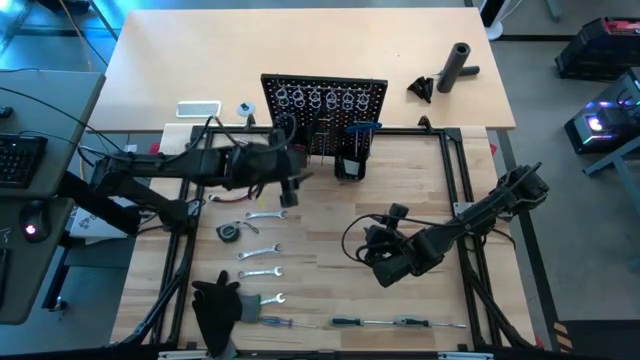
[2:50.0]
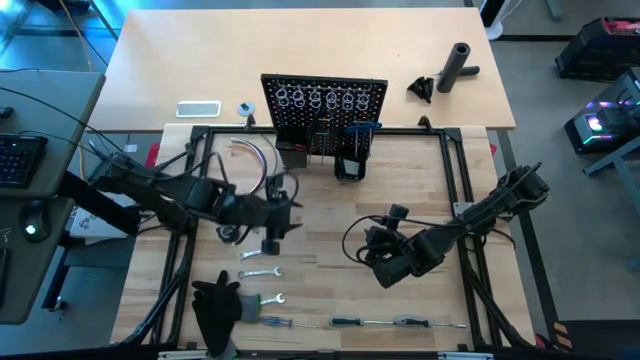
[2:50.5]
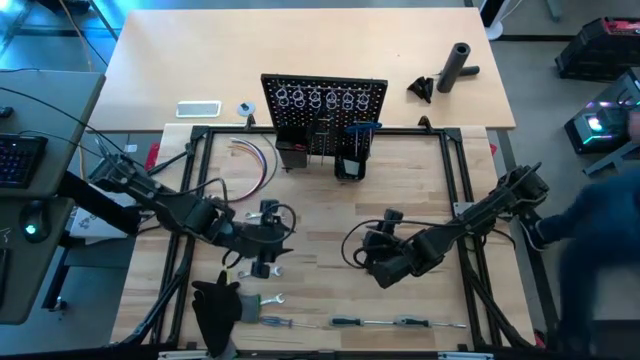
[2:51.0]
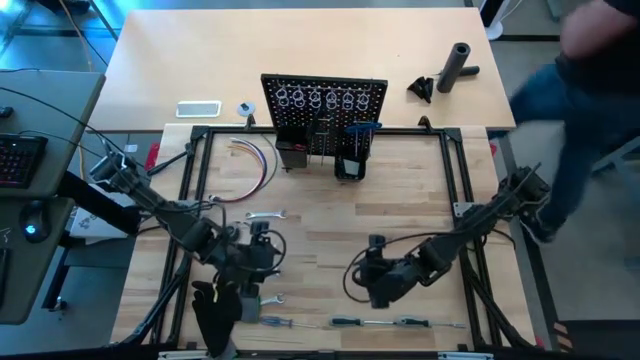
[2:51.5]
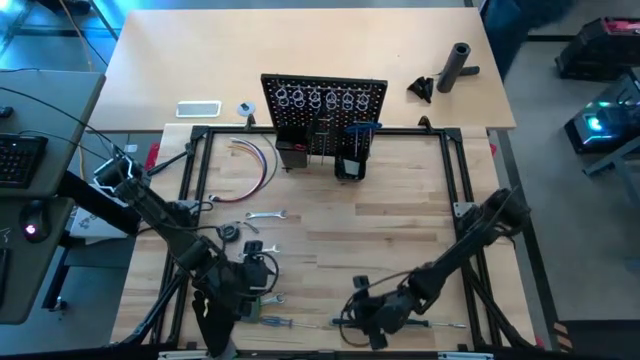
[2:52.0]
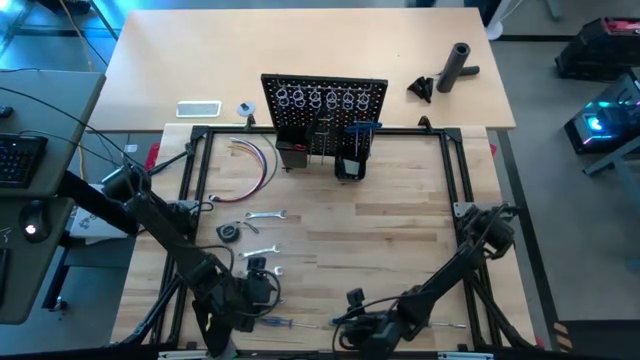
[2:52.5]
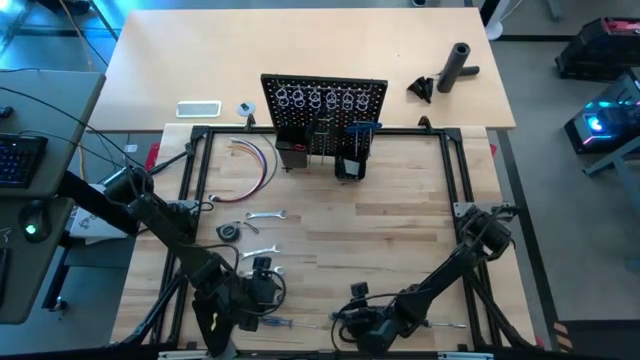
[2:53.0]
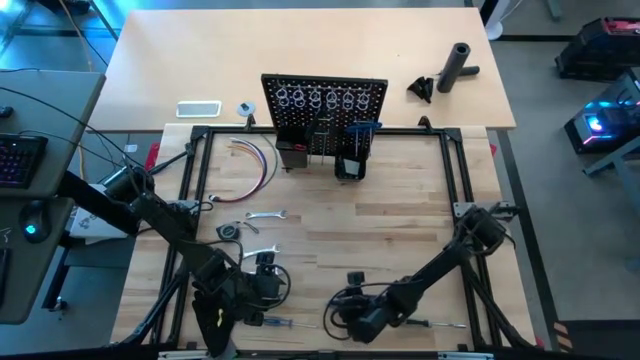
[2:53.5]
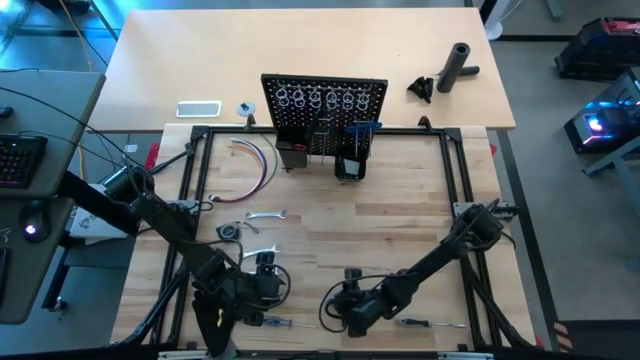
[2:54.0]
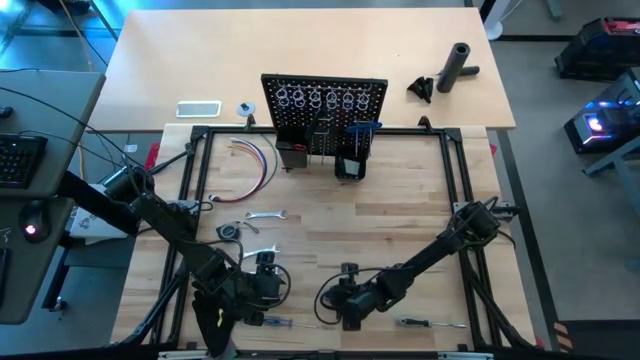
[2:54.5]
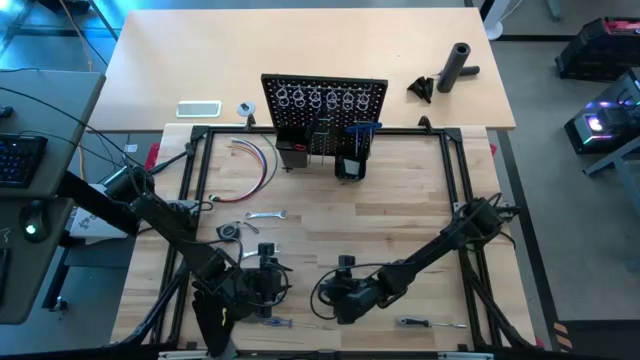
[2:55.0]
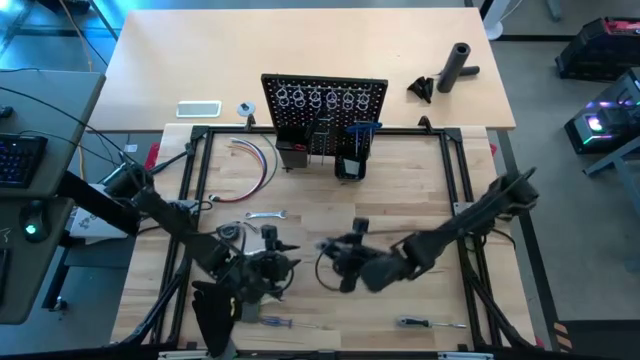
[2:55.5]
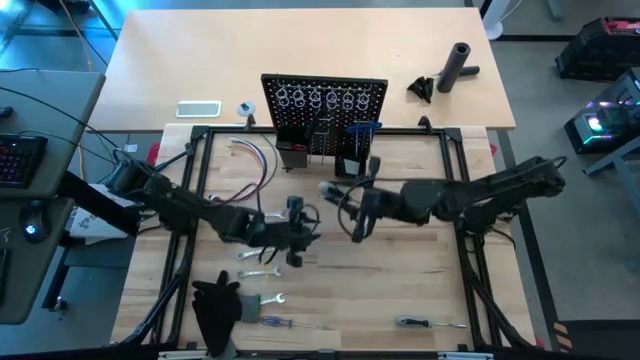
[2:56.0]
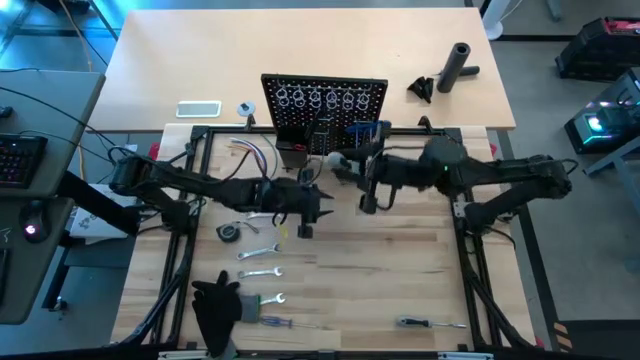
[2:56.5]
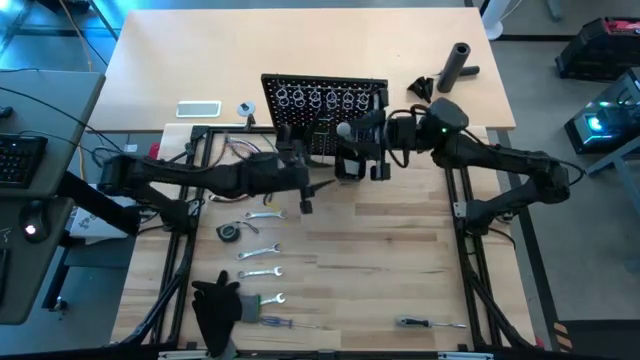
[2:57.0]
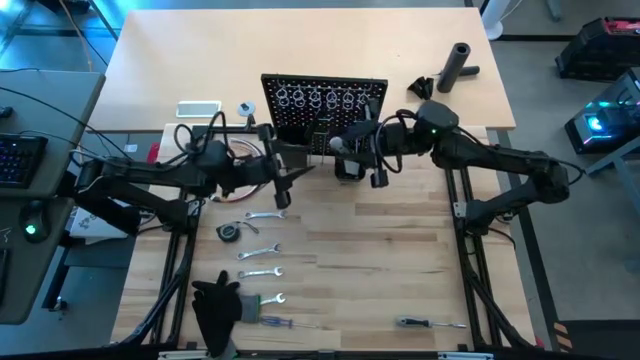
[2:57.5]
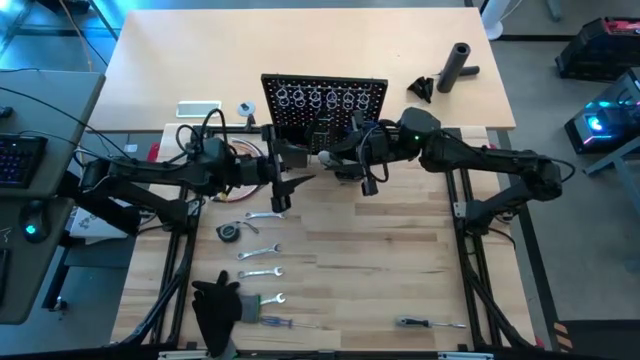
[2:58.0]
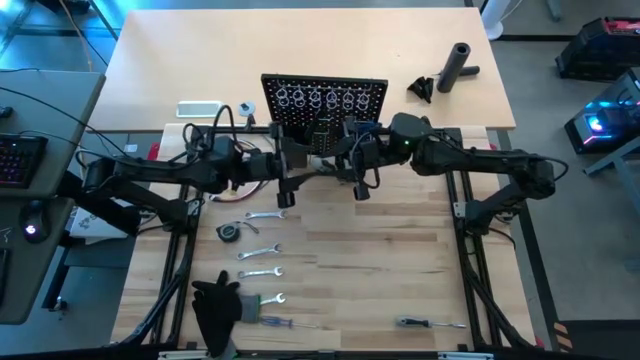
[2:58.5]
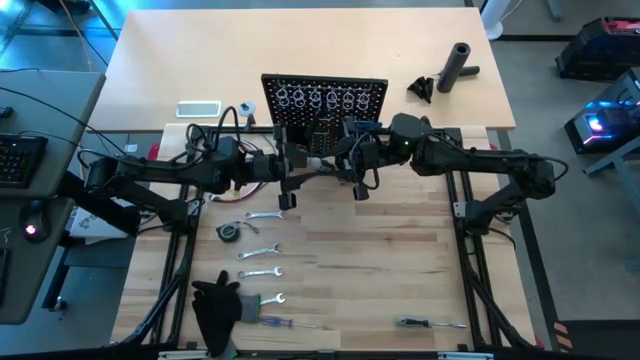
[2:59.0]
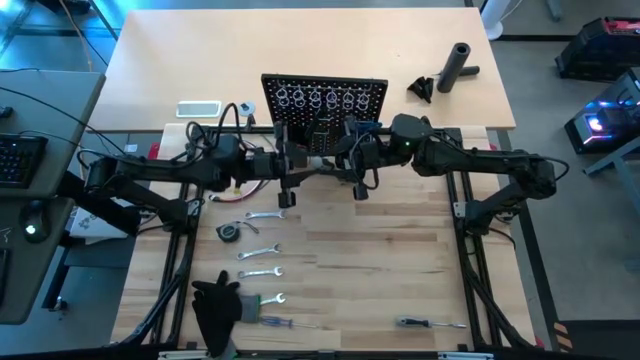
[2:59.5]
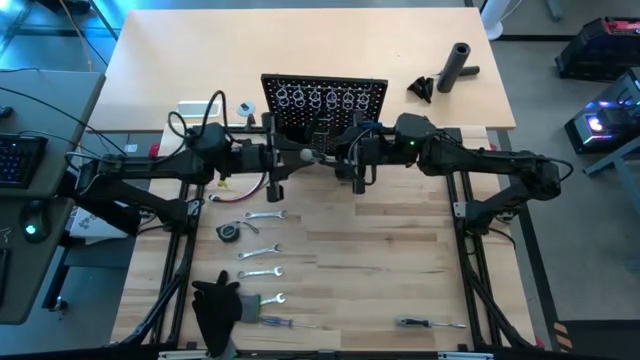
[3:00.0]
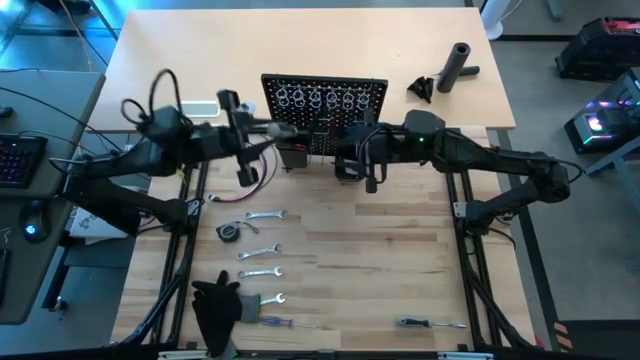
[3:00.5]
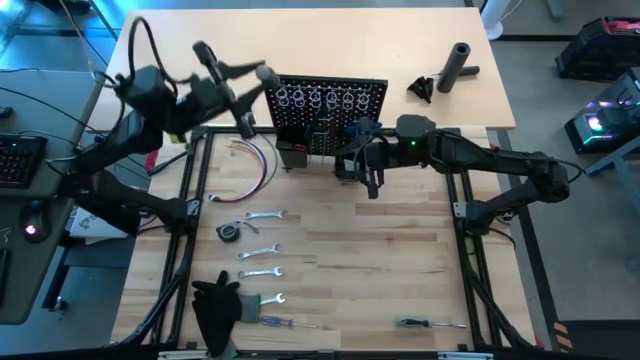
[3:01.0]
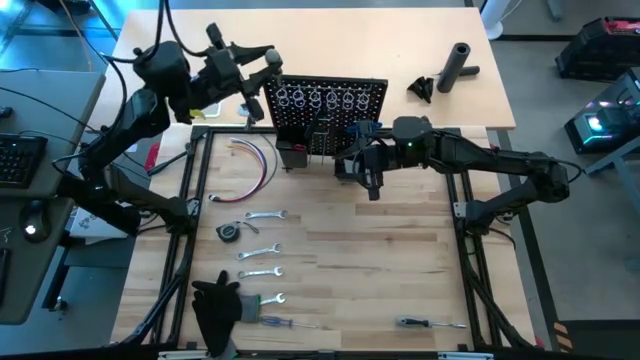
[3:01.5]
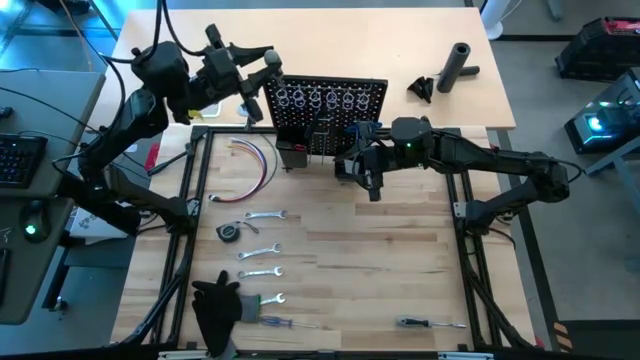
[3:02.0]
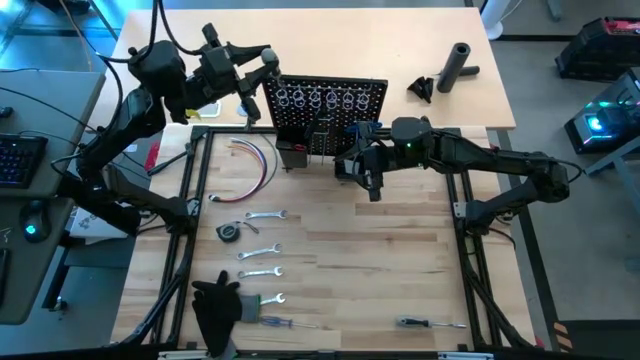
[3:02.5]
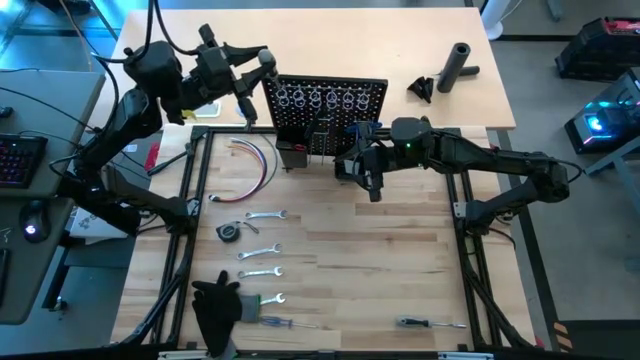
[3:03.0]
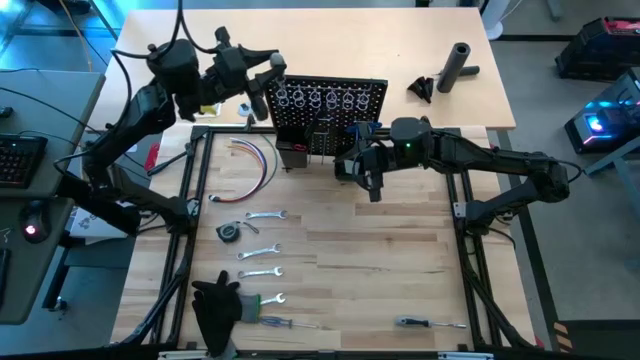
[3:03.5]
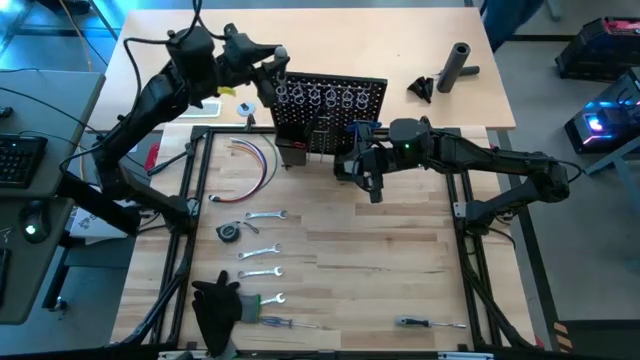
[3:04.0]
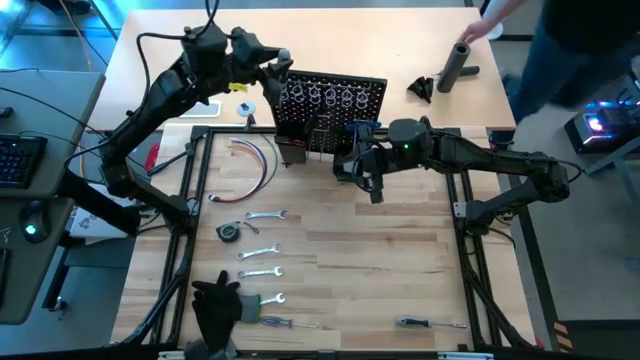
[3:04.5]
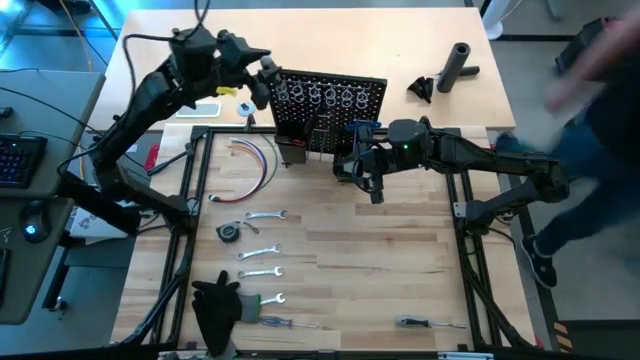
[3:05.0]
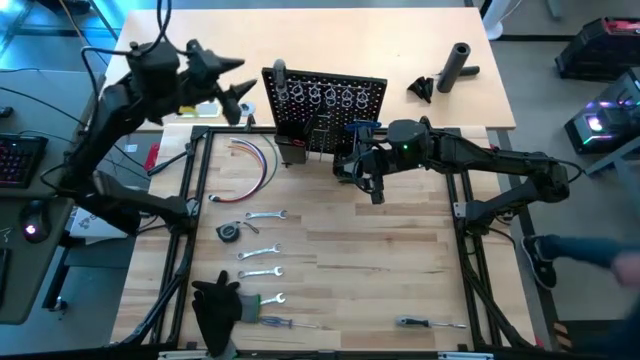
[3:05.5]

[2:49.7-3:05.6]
Task: Hang tools onto peg board
Hang the left gray screwdriver on the black pegboard

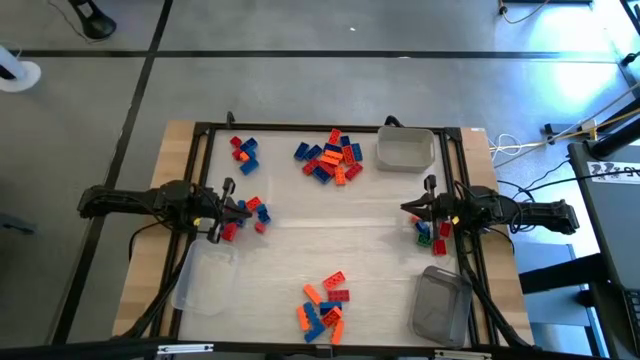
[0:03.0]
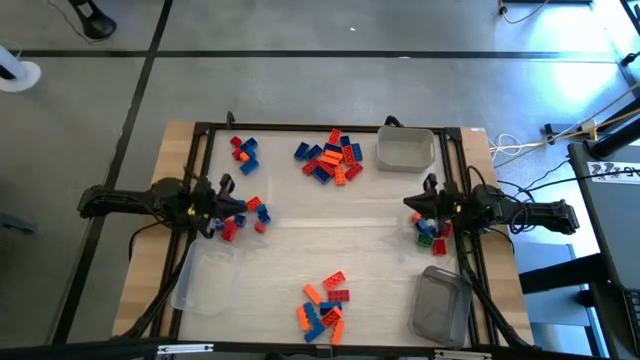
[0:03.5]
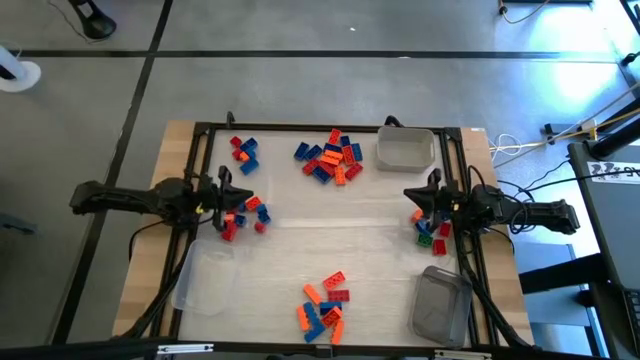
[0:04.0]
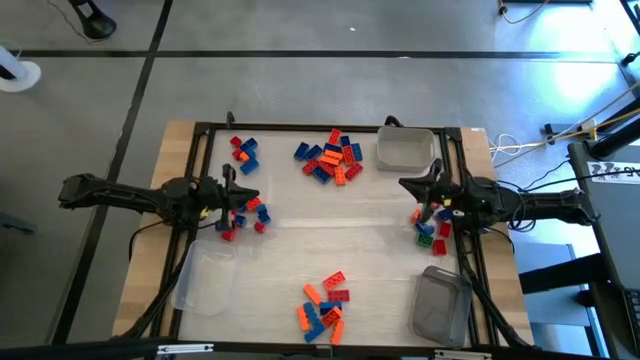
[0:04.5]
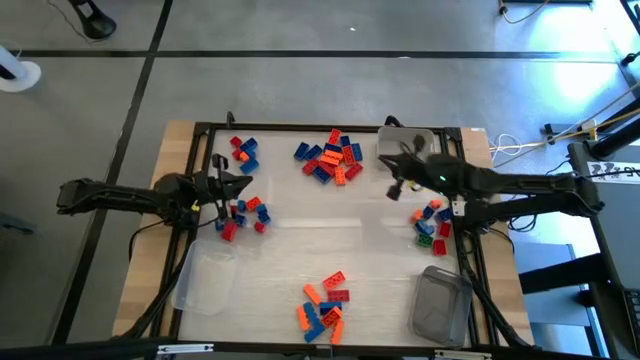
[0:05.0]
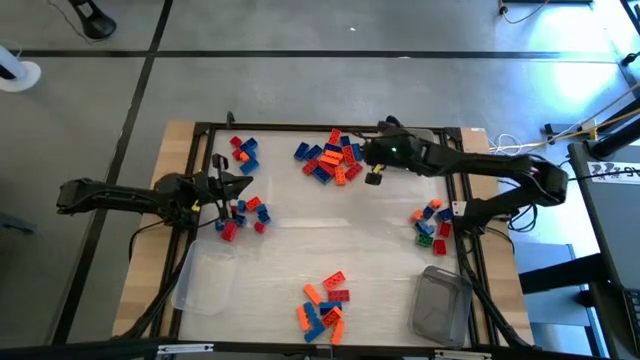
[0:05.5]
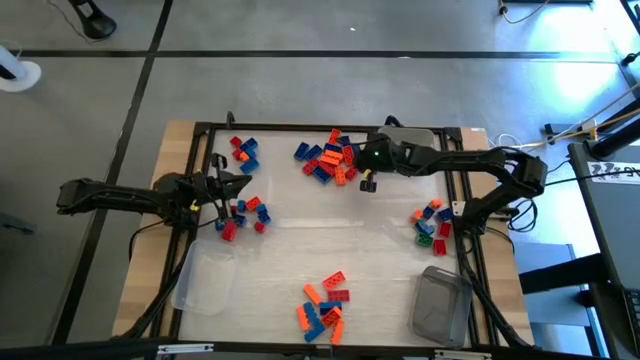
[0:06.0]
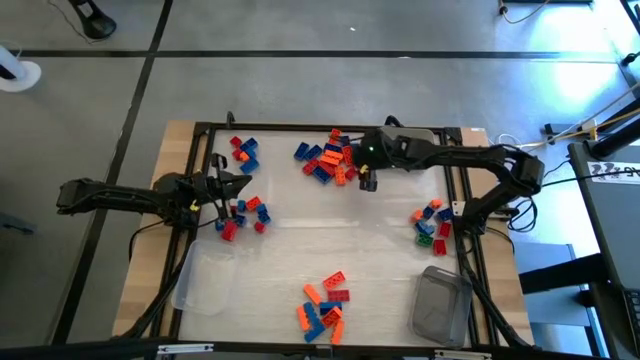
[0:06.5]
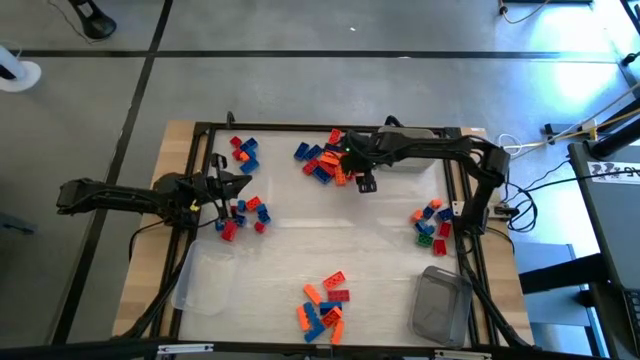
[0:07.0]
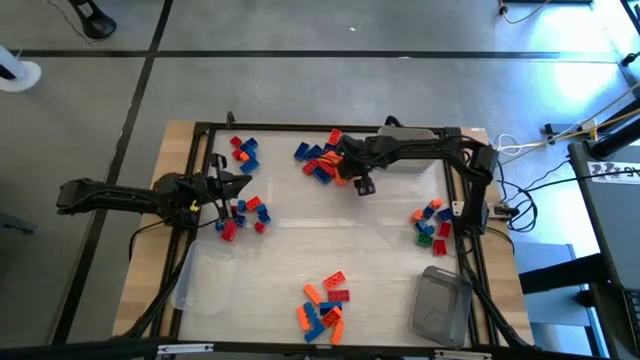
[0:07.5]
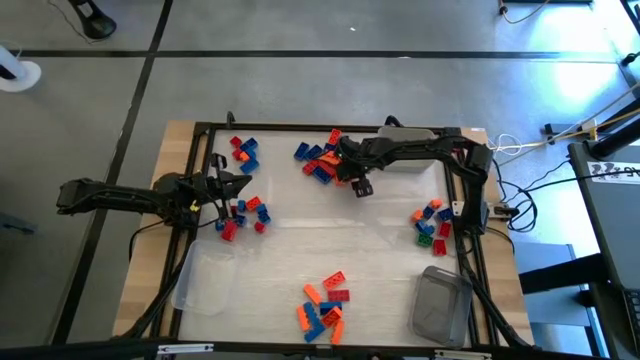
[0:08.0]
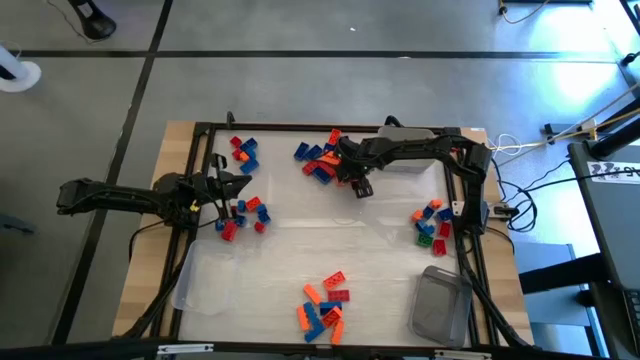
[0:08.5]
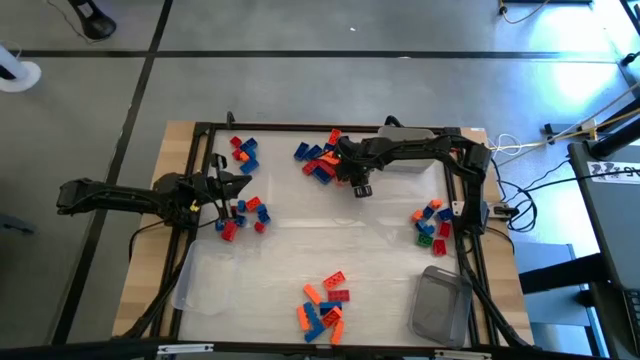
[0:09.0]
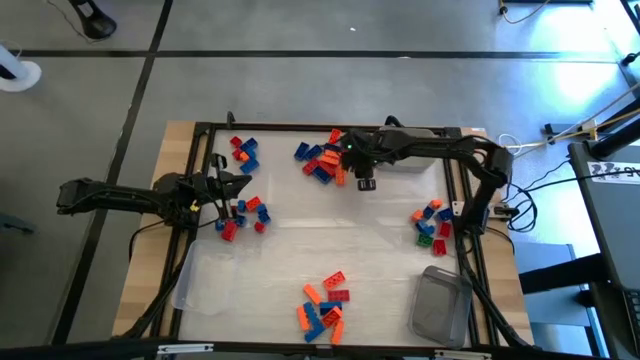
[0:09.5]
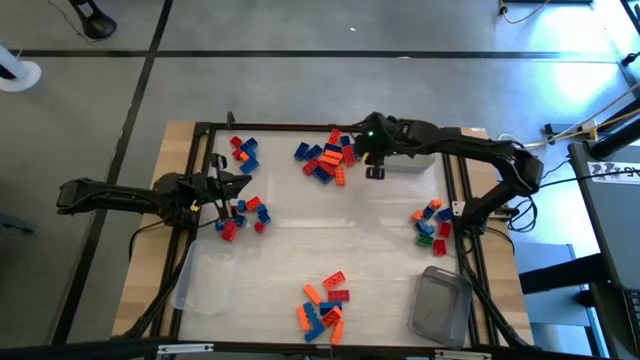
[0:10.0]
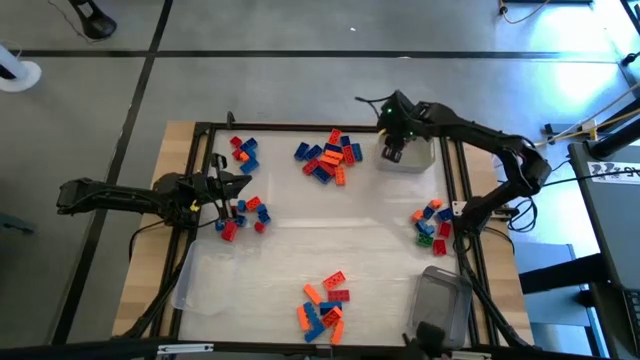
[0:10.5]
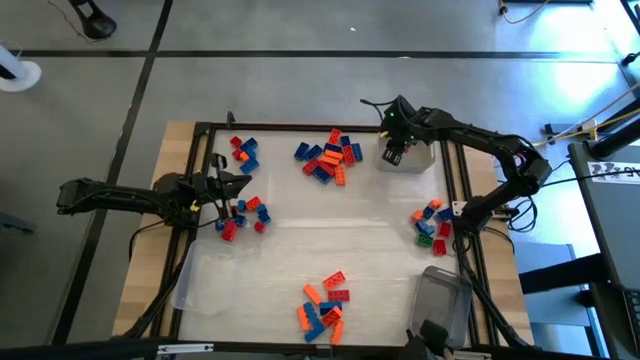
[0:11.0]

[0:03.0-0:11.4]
Task: Sort blocks by size
Put the red game piece into the gray bin
